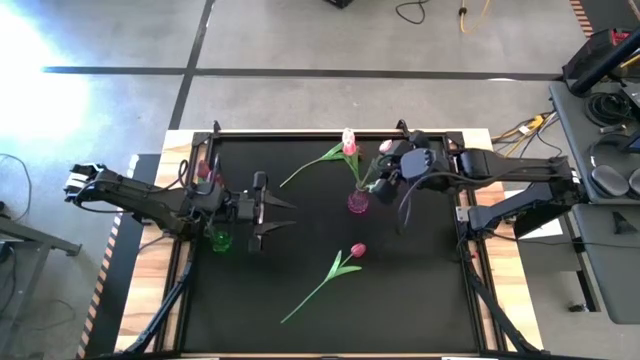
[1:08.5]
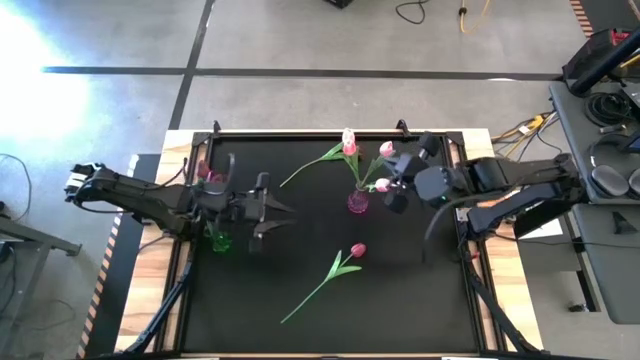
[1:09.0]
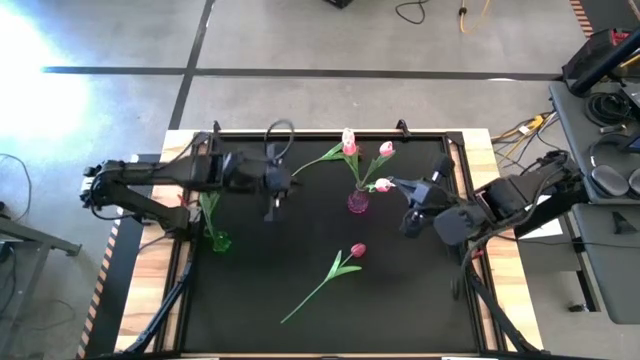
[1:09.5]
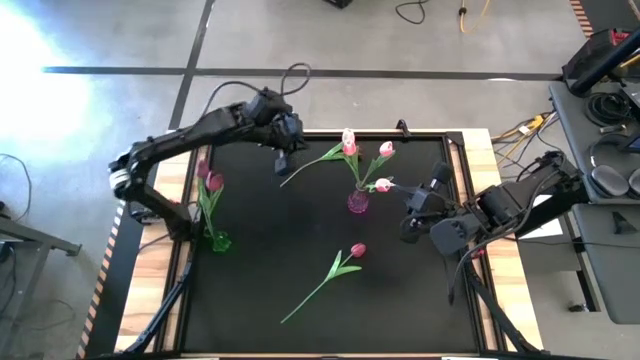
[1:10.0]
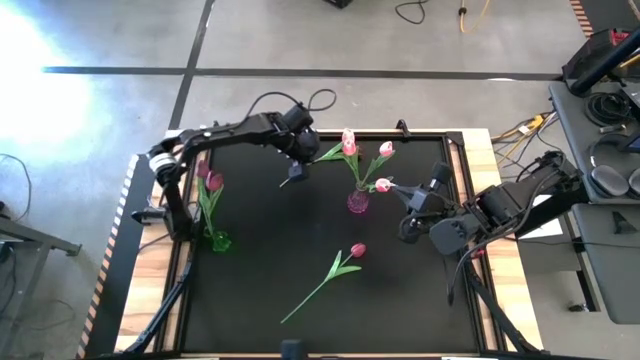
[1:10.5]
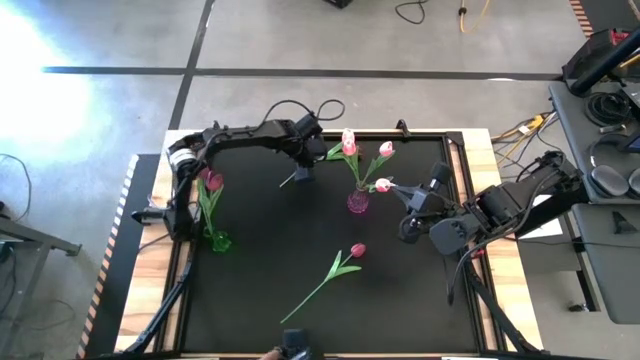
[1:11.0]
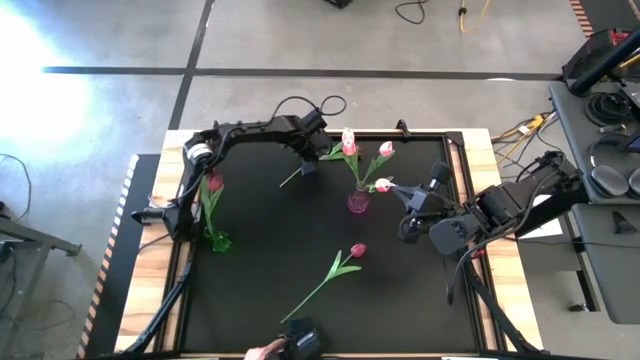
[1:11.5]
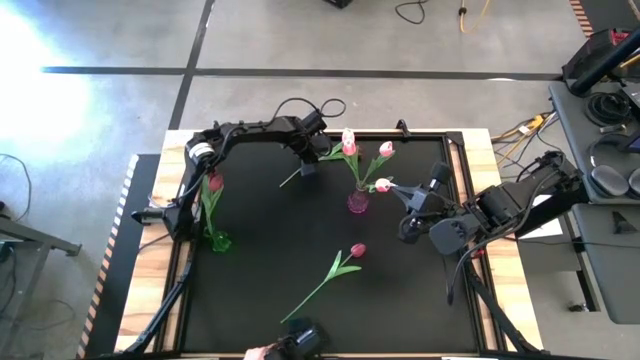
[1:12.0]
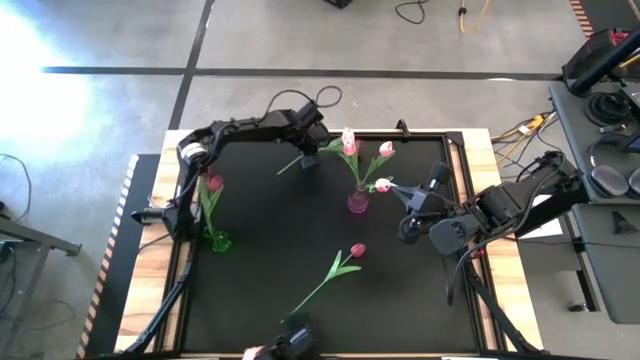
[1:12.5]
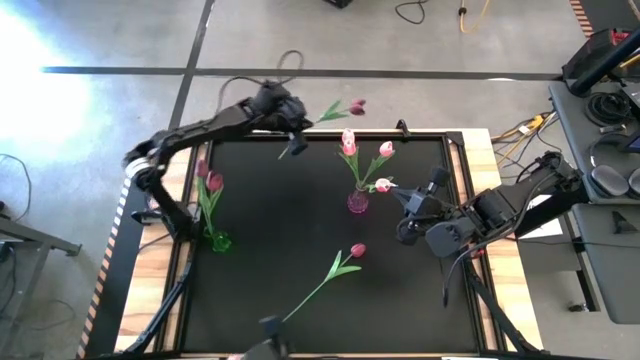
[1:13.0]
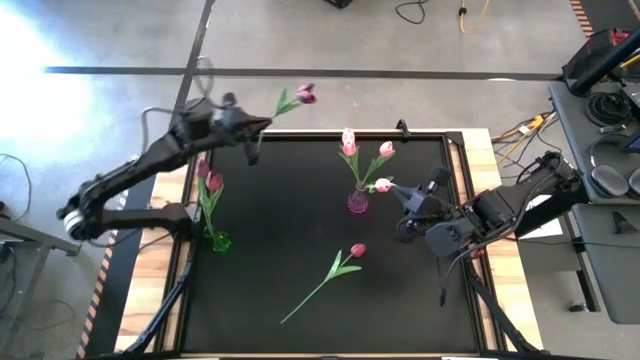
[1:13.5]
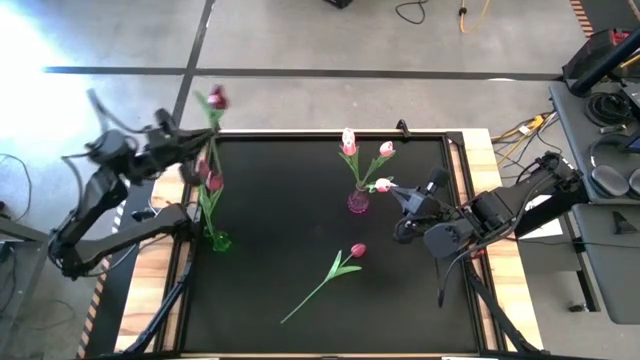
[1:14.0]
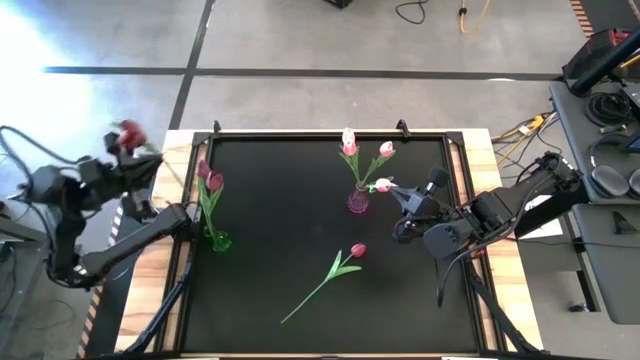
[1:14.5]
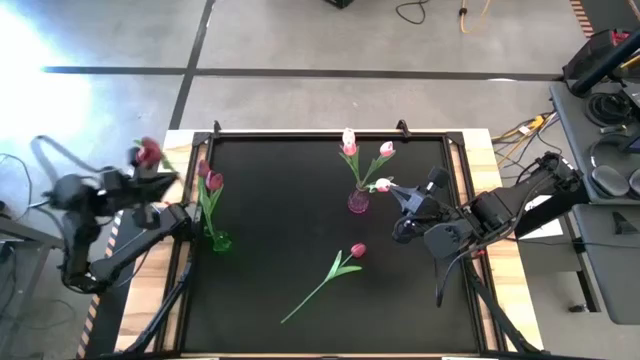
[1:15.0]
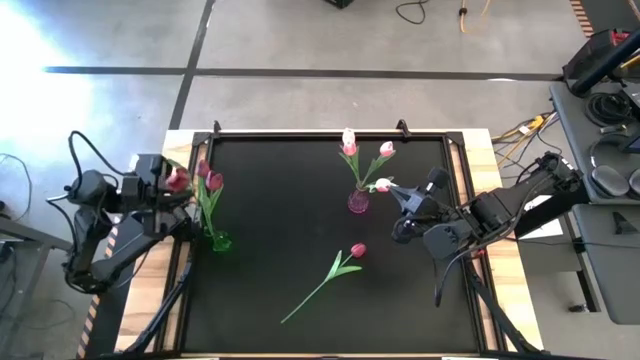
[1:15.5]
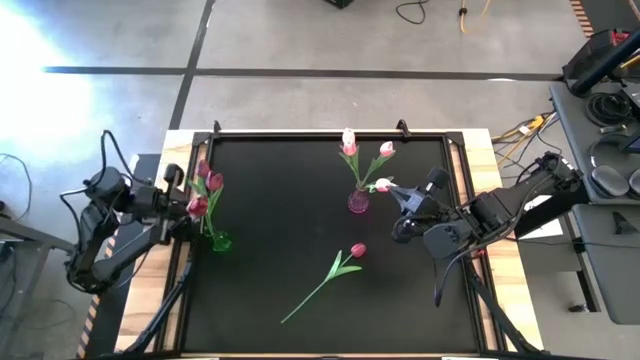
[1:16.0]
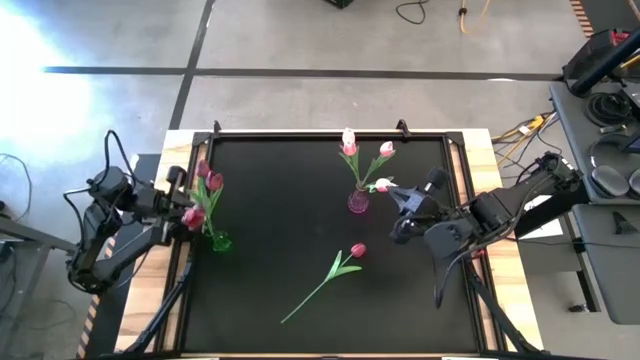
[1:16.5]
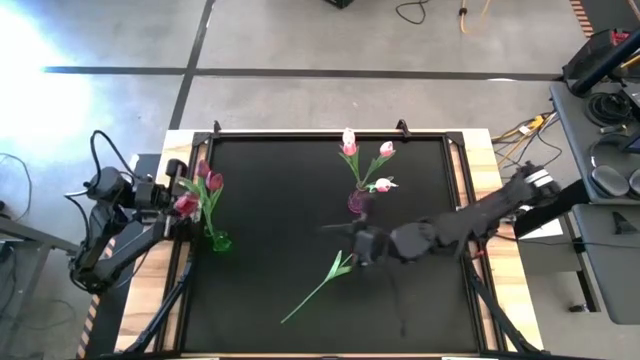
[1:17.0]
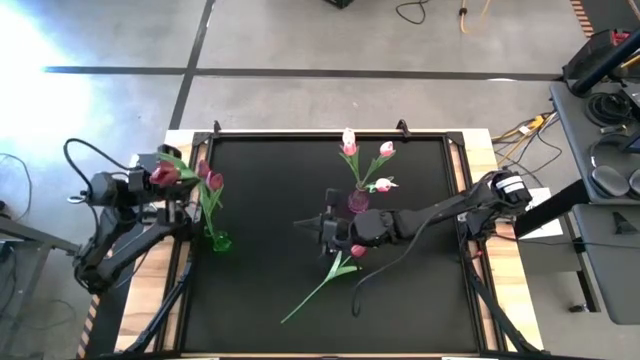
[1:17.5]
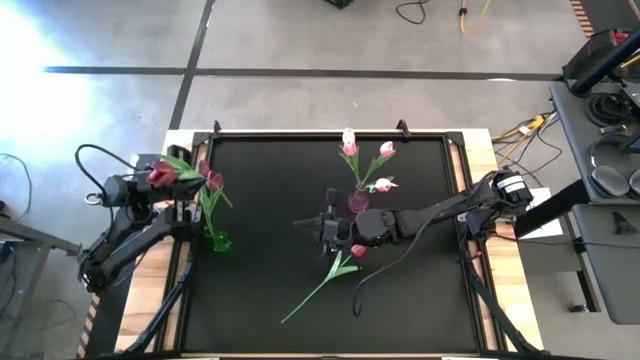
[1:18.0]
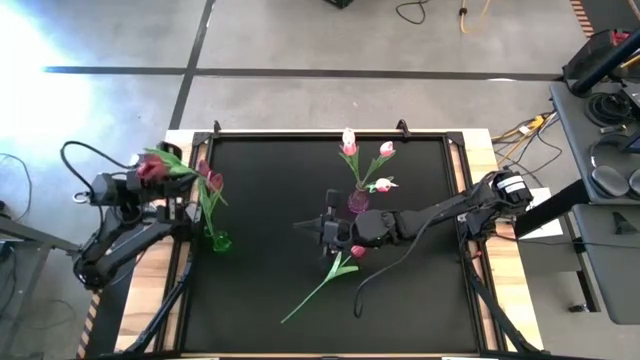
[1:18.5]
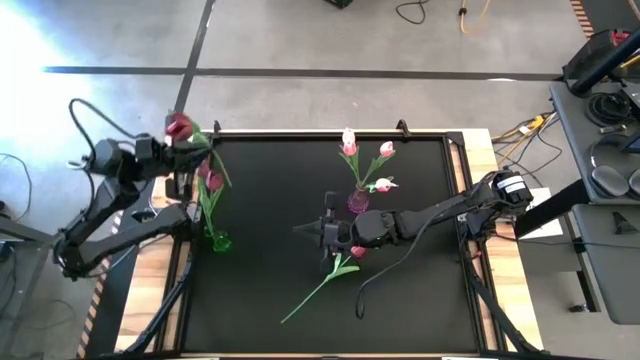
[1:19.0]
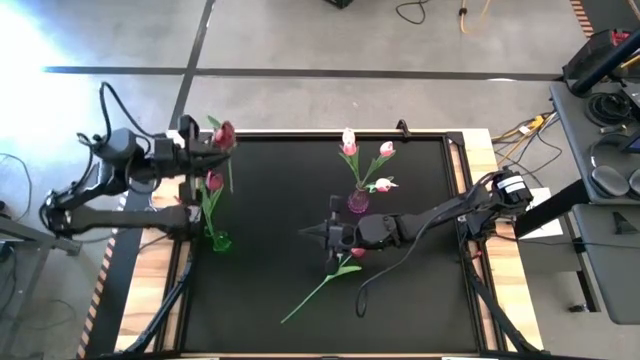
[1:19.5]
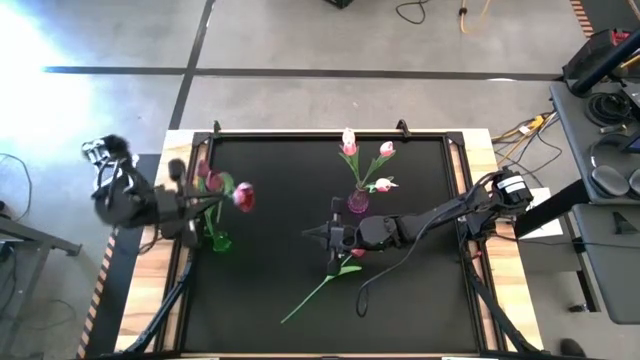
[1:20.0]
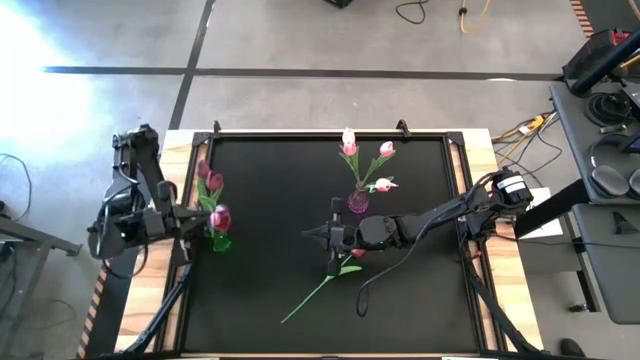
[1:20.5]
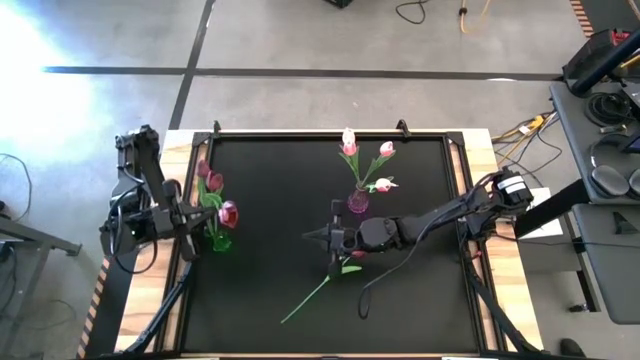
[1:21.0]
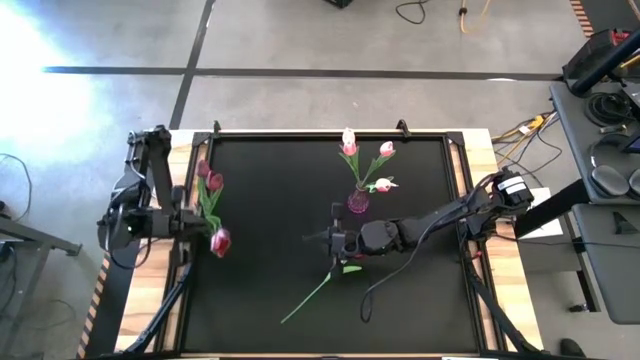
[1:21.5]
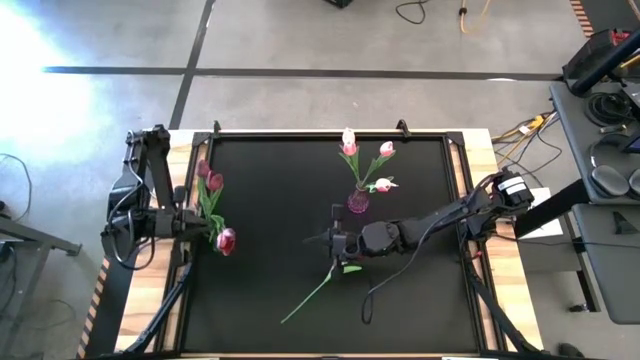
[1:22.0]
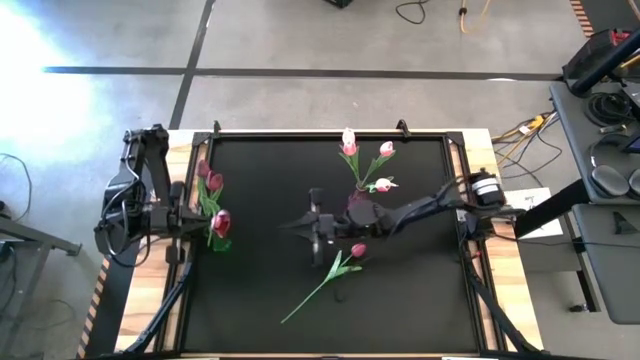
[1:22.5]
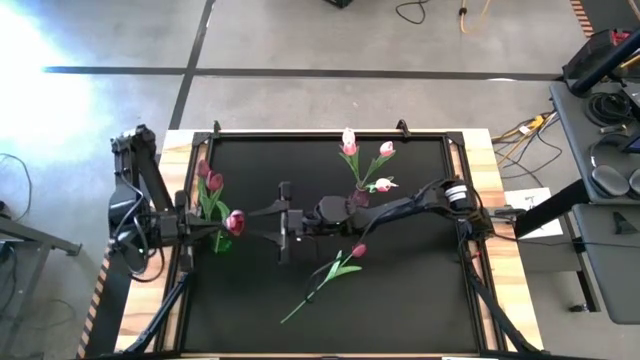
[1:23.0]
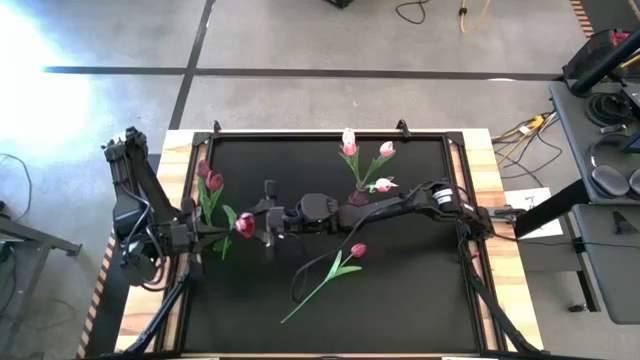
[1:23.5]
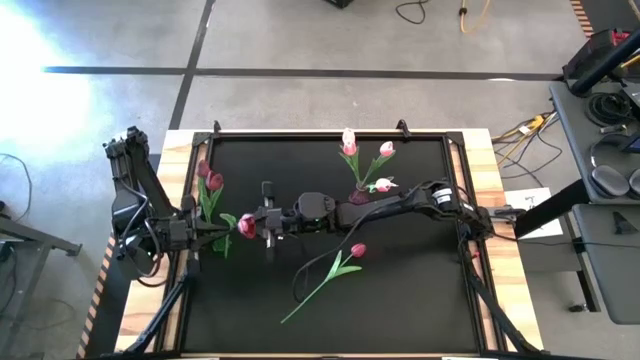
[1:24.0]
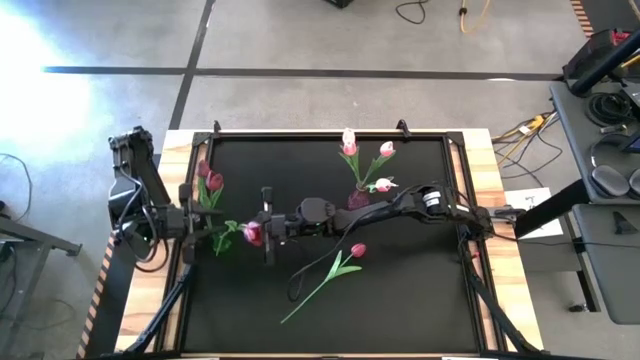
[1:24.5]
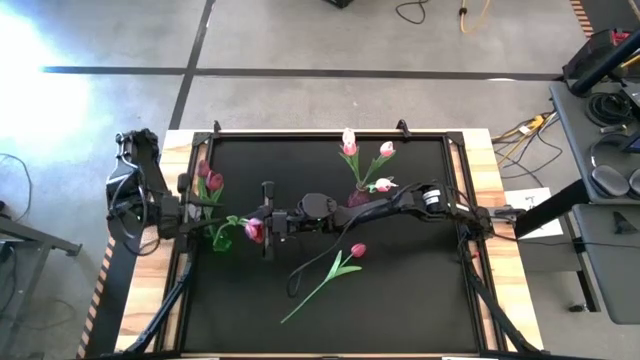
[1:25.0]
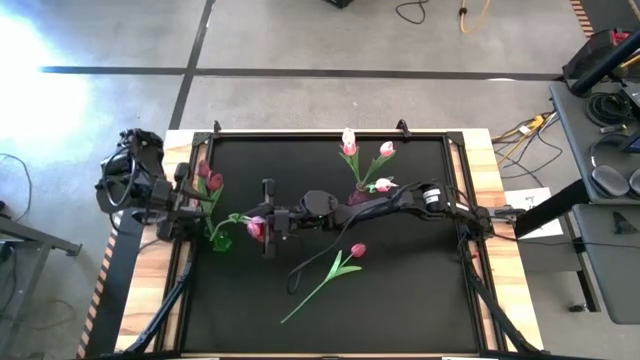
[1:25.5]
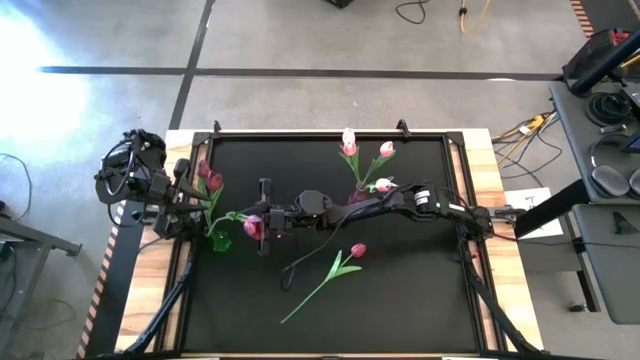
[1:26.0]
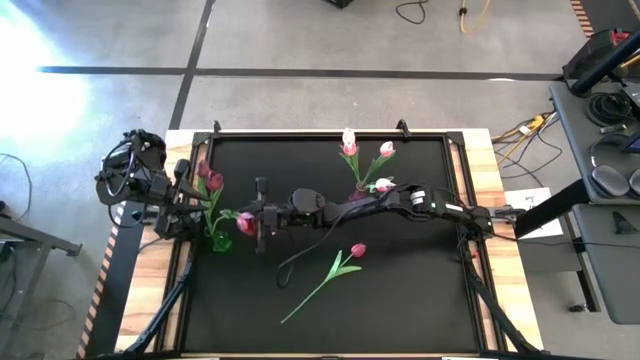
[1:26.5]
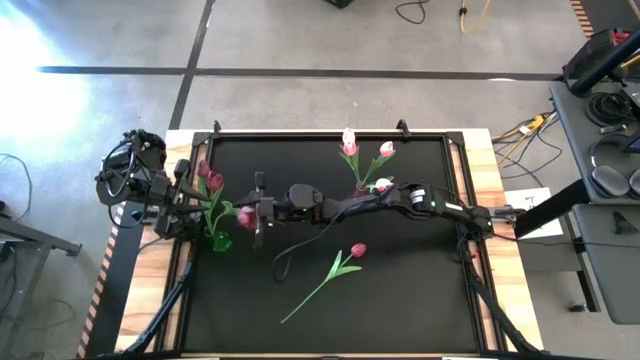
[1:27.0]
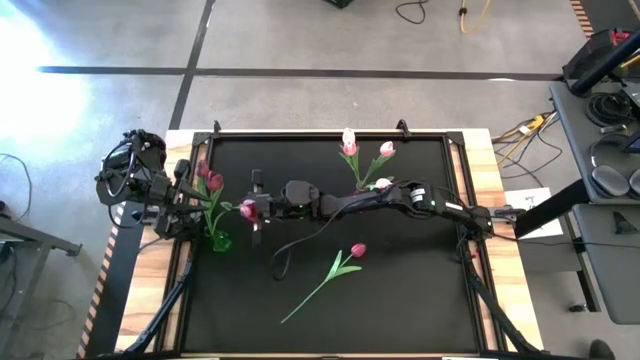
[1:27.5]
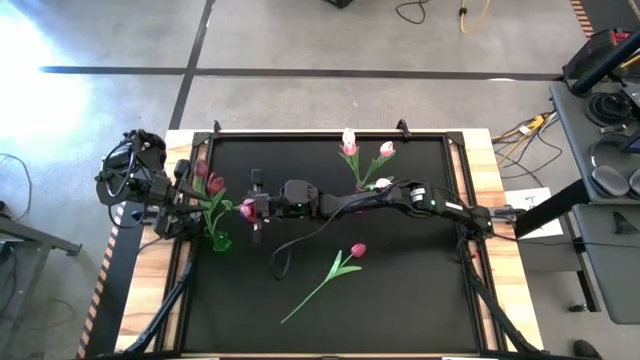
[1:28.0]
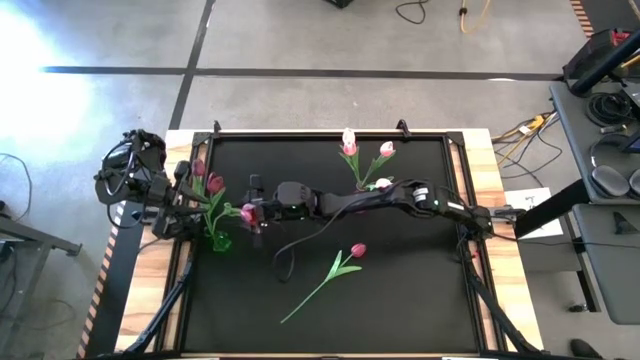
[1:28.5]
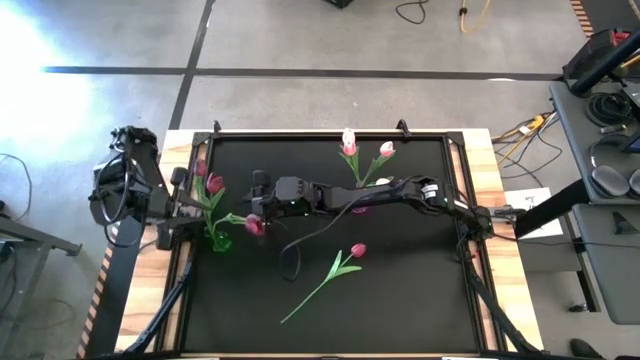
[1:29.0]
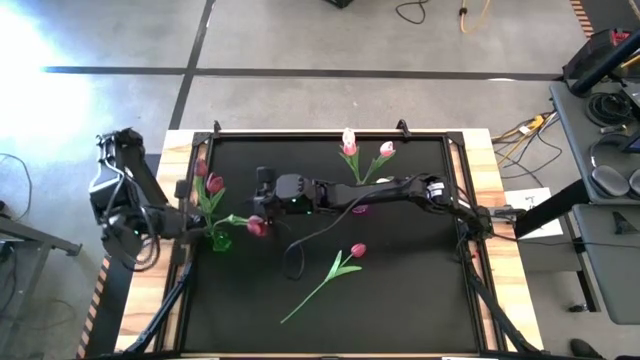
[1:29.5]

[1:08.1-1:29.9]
Task: Sort flowers into vase by color
Put the red tulip into the green vase
